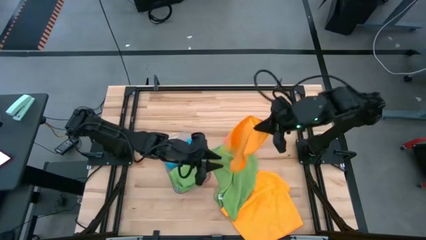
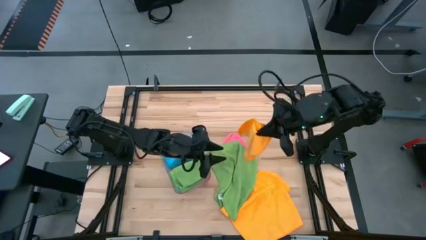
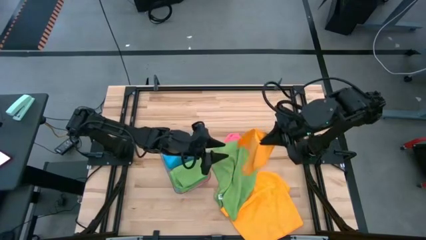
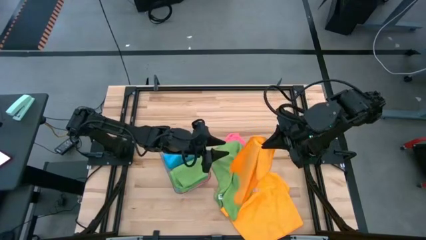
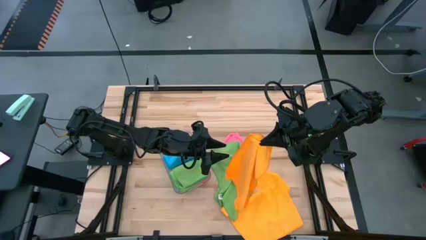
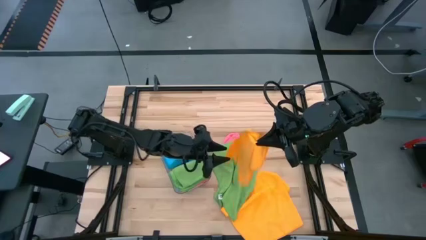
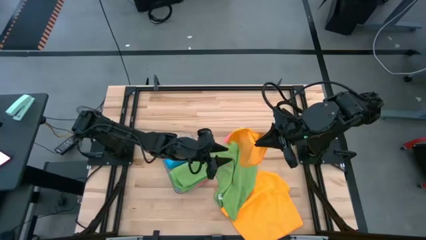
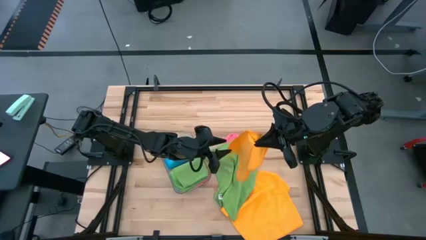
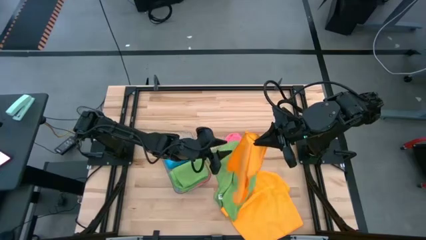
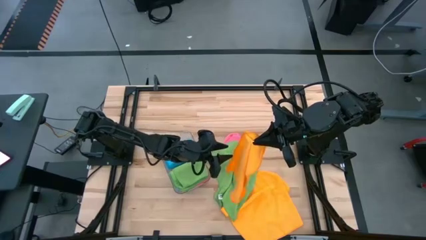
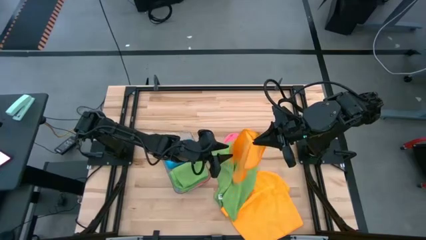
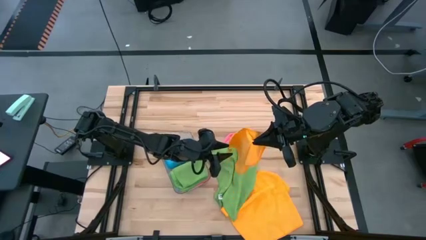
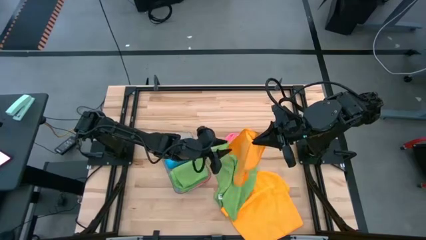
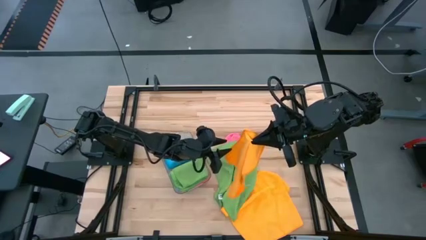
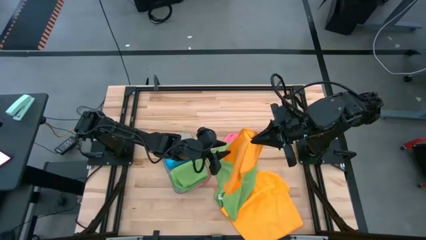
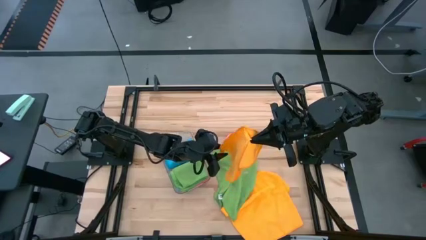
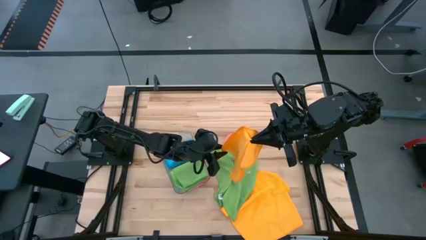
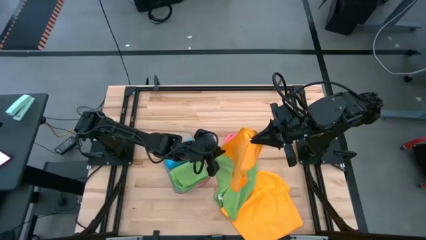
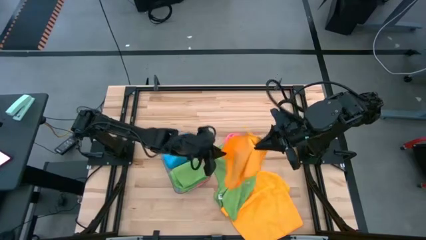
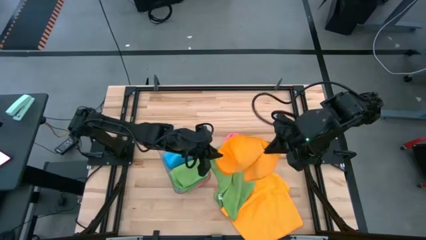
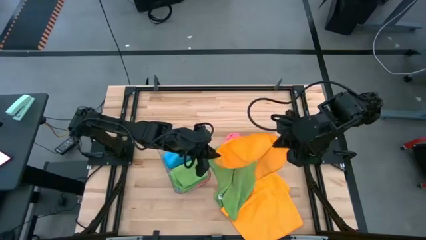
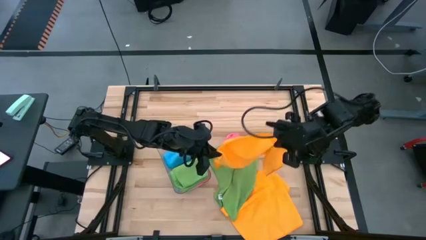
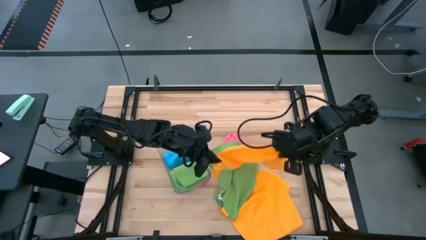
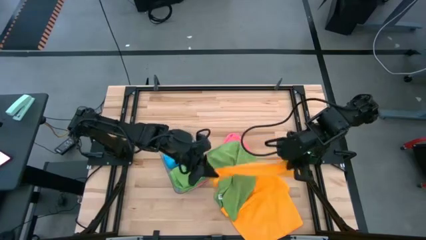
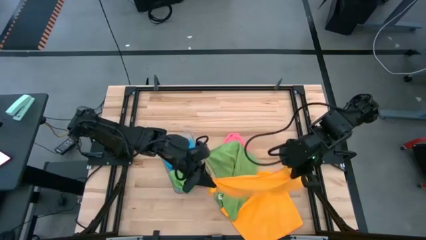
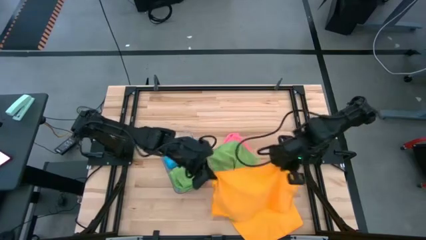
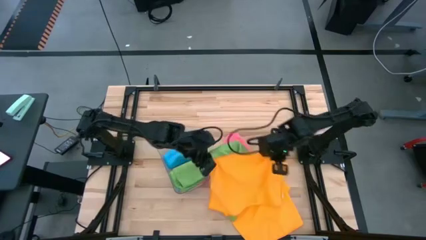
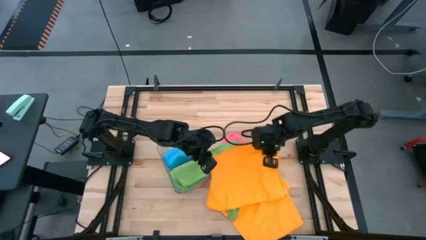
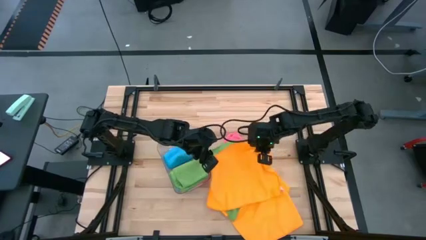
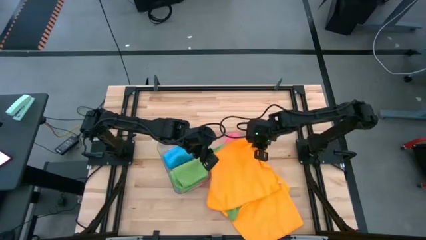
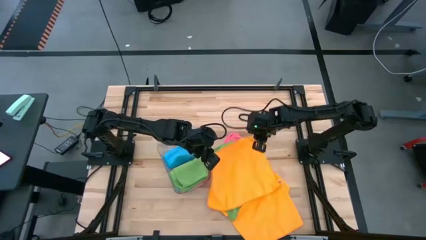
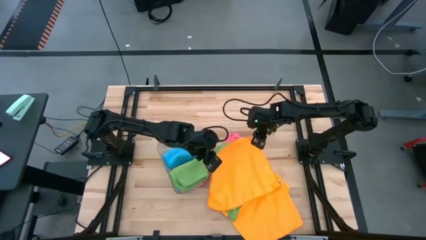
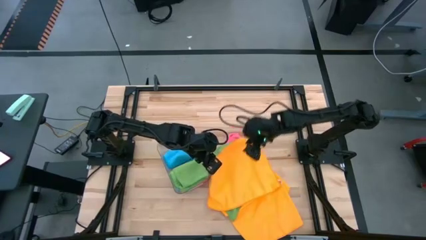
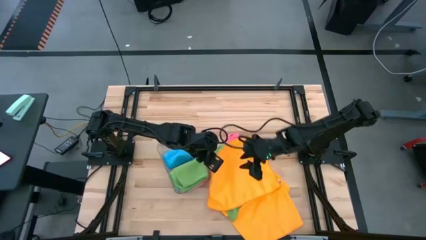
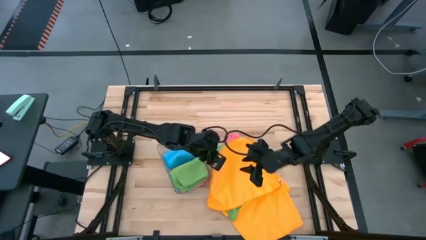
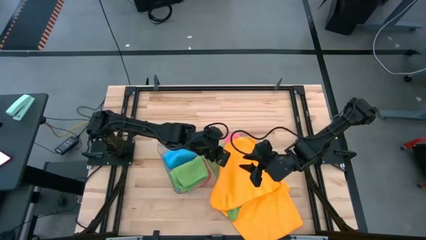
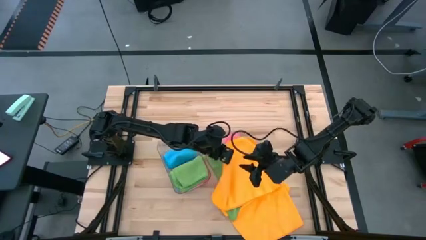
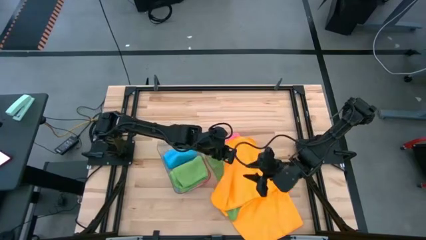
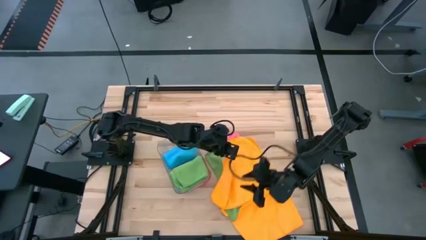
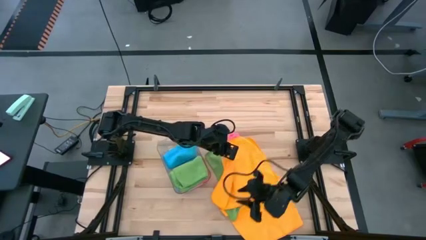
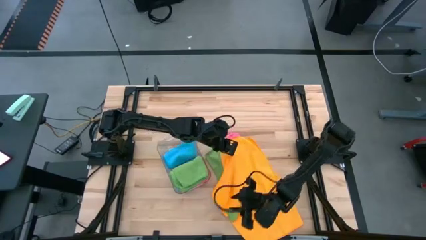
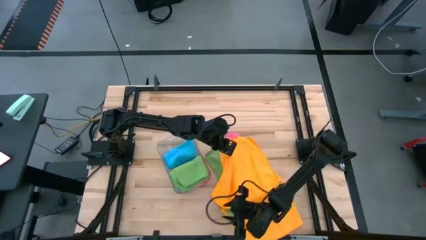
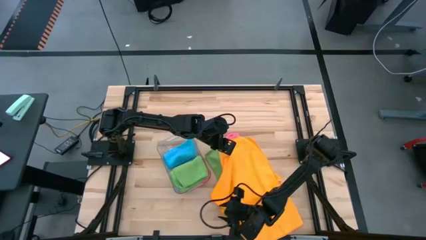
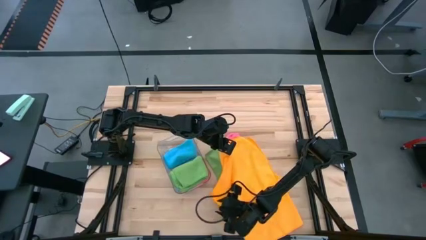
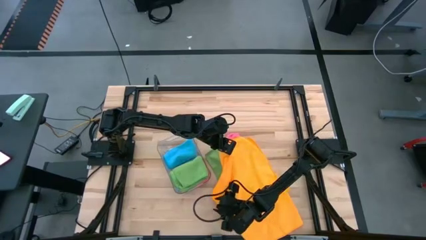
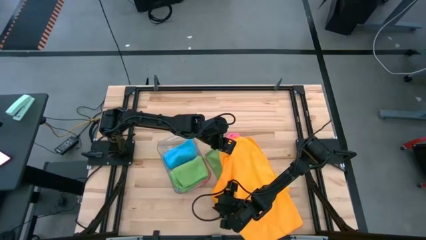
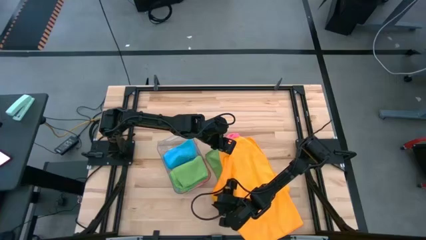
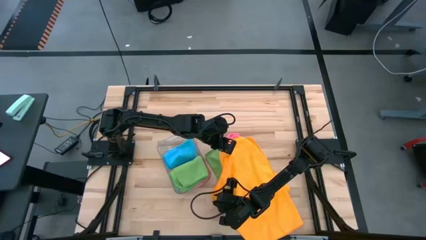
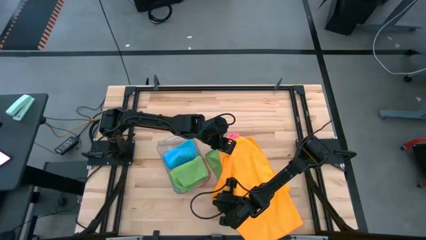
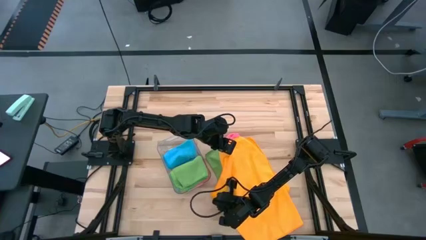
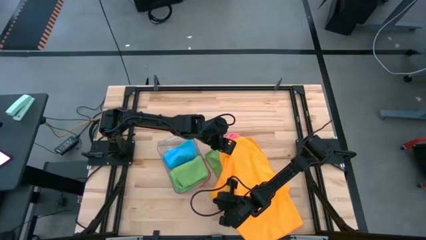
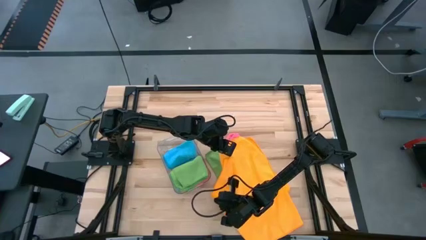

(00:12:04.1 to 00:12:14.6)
Task: Fold microfiber towels
Fold the left yellow towel

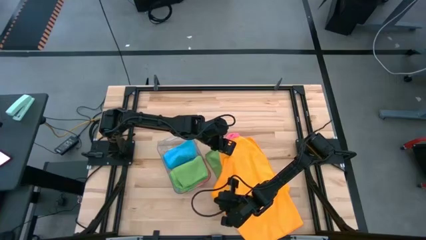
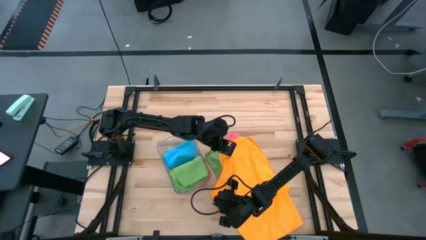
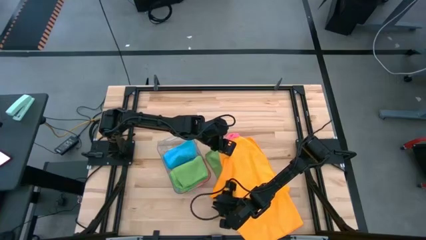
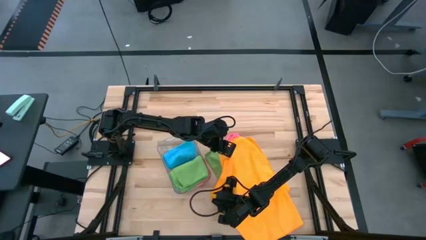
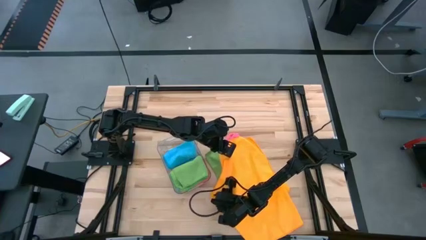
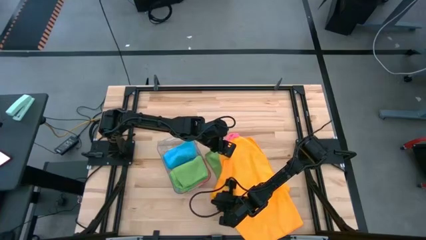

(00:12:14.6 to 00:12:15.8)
Fold the left yellow towel
